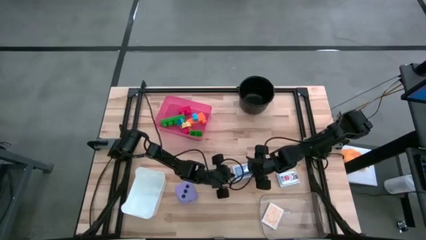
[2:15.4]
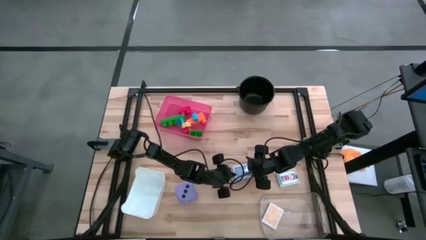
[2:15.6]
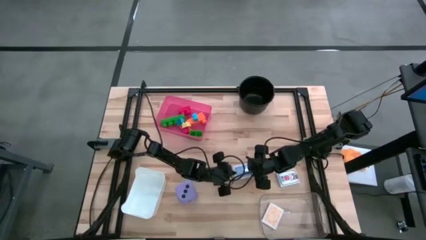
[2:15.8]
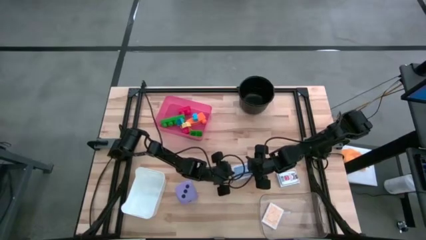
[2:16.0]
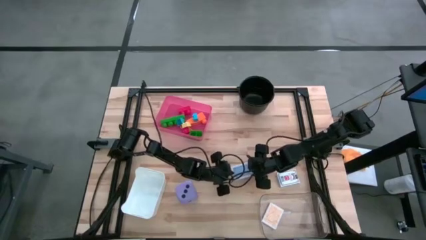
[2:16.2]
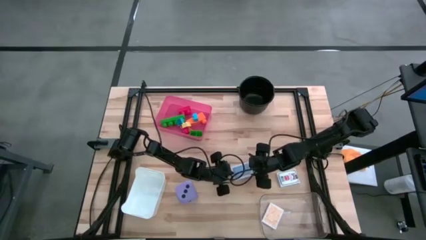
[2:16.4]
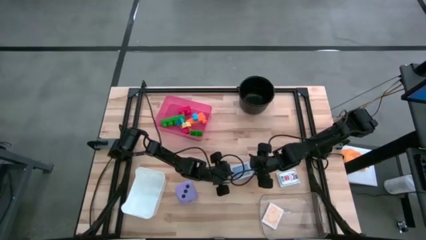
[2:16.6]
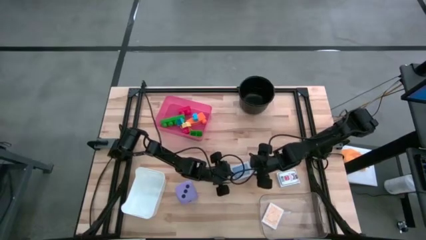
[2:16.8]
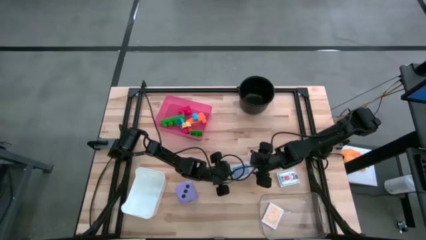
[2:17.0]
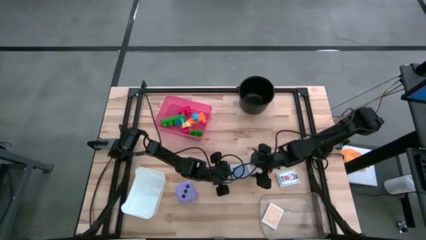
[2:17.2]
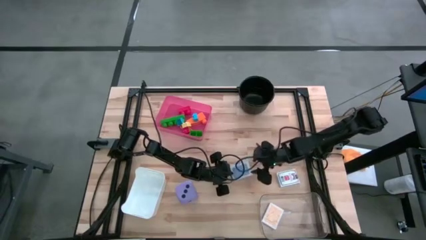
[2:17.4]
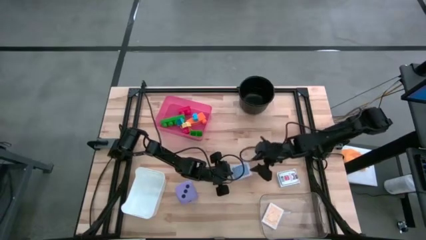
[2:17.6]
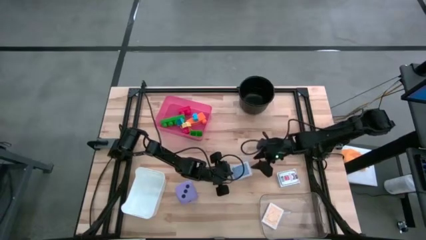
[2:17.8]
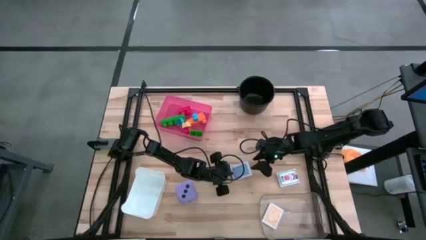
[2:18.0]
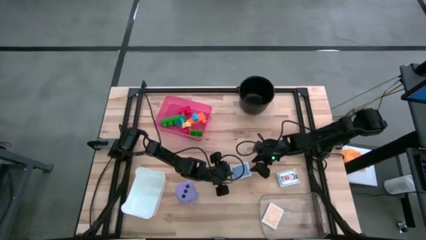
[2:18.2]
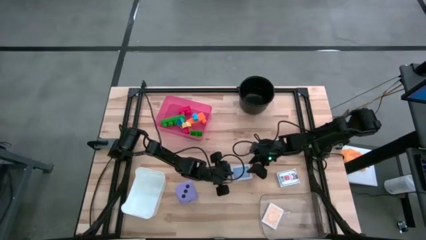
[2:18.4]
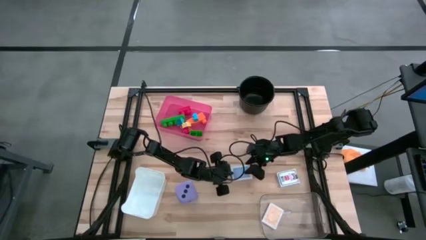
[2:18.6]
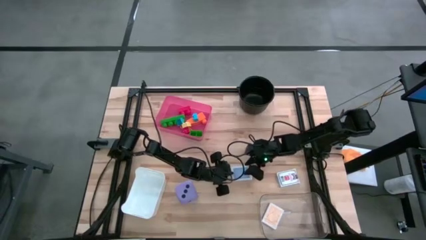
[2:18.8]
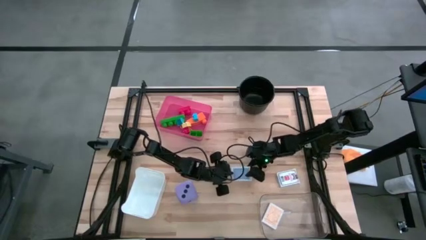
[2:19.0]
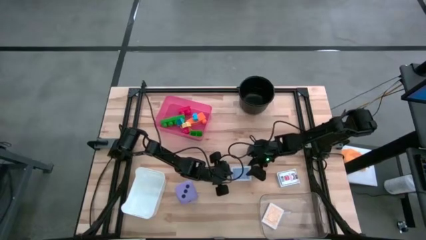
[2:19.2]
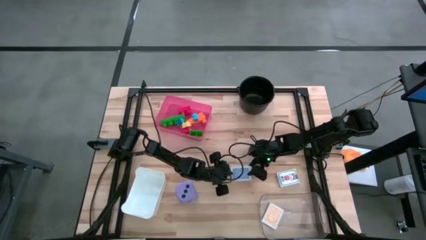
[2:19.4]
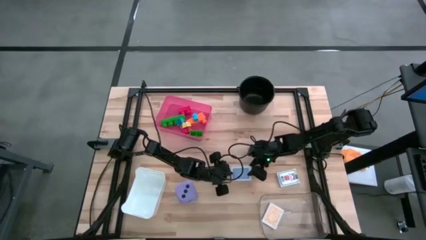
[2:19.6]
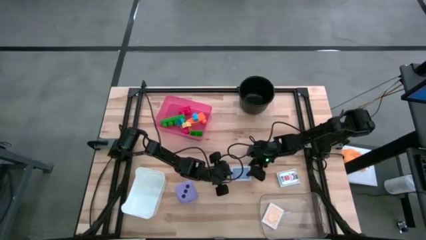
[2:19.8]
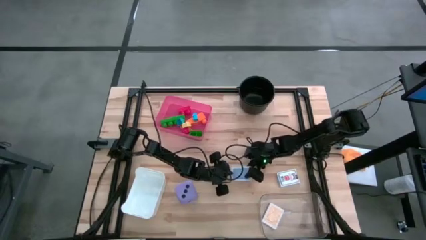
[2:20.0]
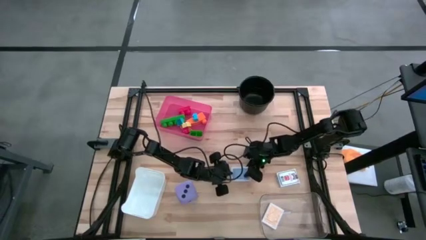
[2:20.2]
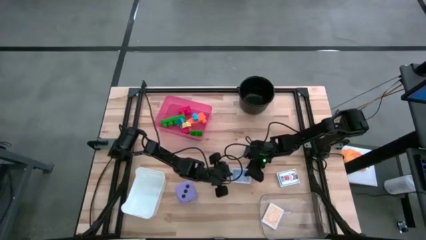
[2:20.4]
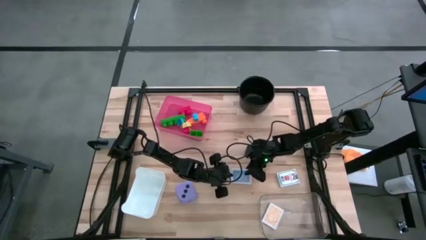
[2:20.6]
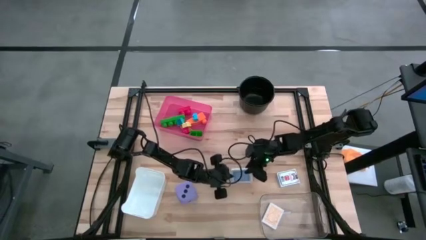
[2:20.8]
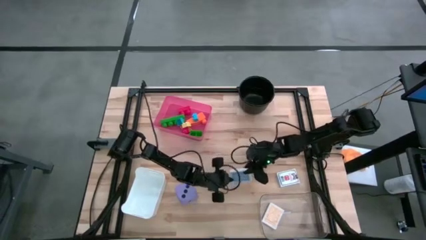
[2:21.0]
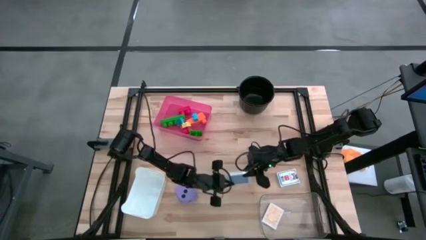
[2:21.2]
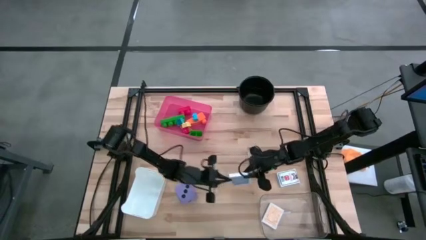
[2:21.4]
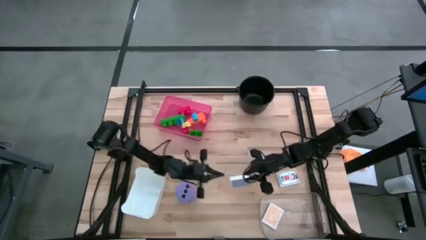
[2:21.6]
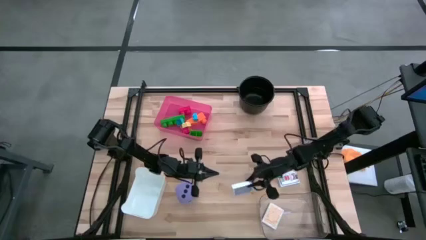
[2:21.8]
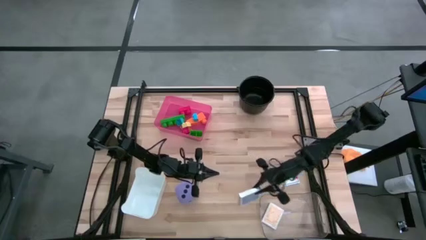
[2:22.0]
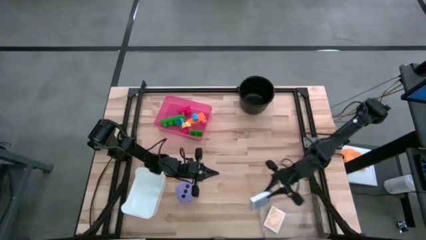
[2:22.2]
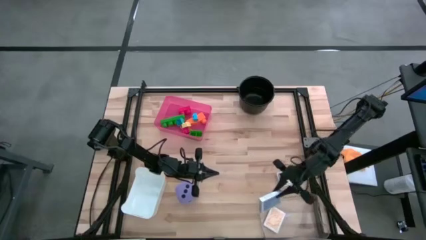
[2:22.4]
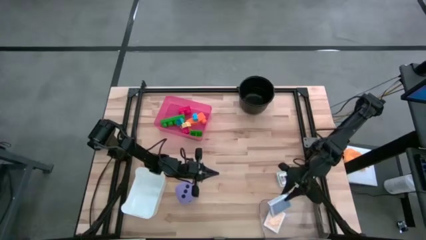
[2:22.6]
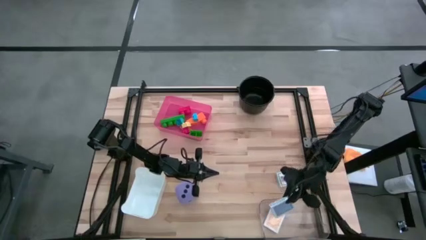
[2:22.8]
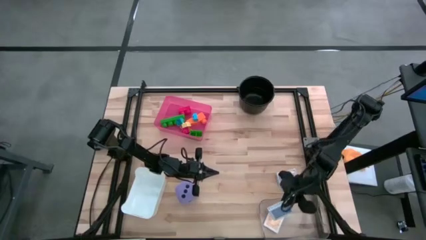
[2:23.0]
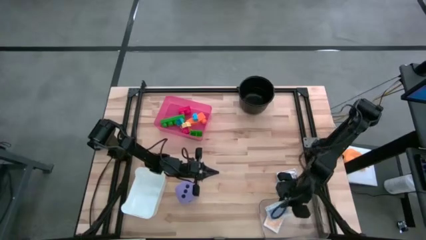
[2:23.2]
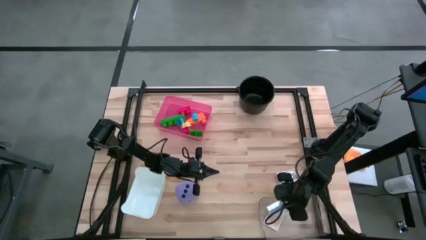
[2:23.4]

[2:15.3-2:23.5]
Task: Pick & Place Toys
Put the blue deck of cards into the transparent bin

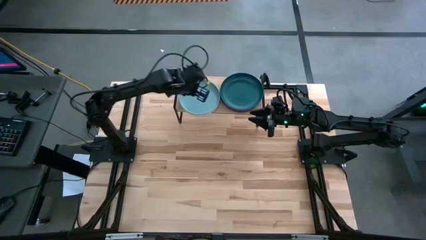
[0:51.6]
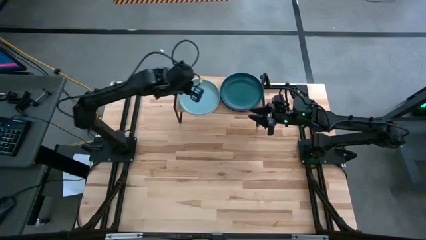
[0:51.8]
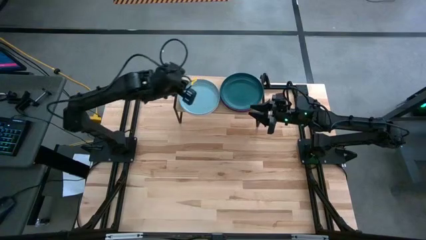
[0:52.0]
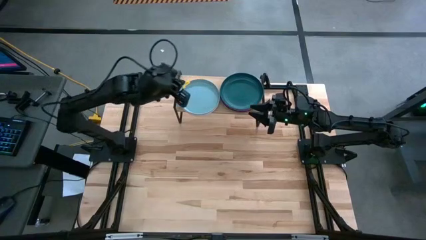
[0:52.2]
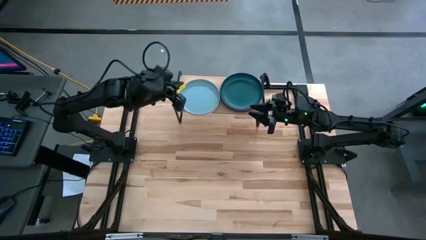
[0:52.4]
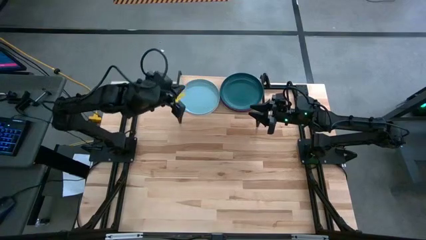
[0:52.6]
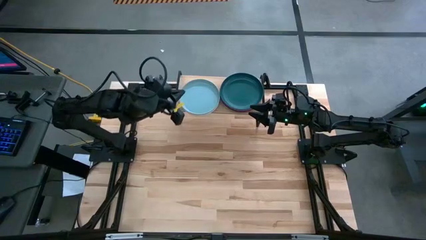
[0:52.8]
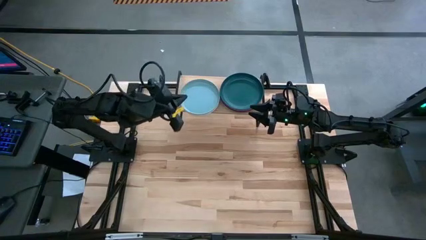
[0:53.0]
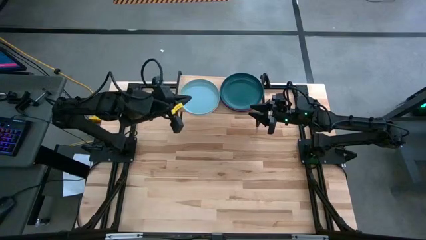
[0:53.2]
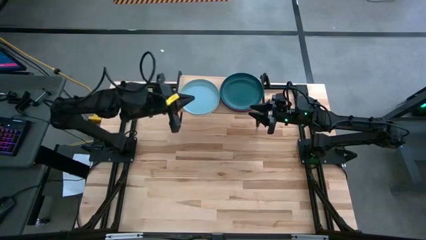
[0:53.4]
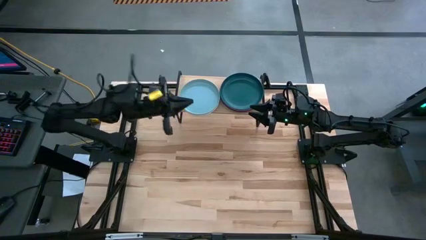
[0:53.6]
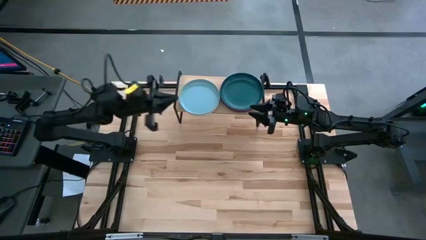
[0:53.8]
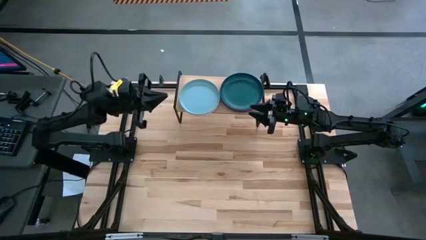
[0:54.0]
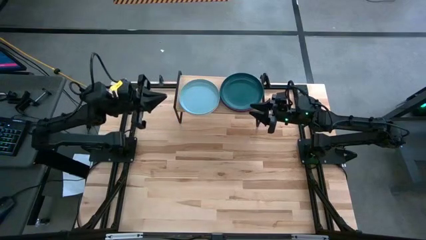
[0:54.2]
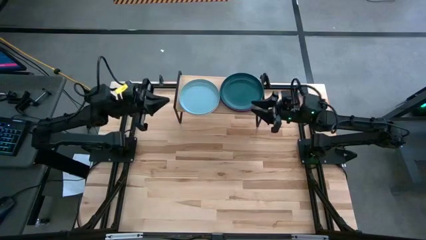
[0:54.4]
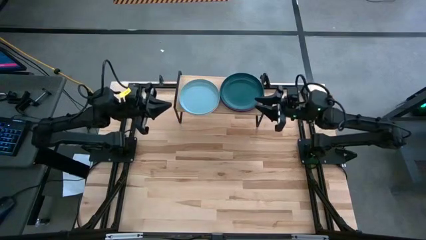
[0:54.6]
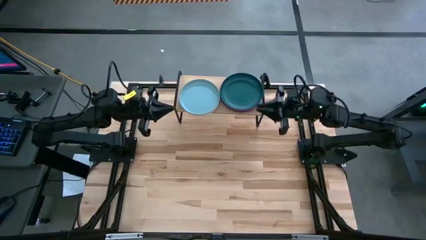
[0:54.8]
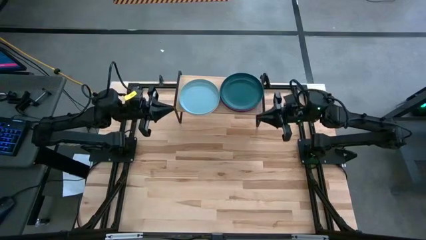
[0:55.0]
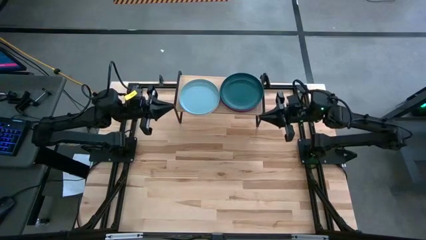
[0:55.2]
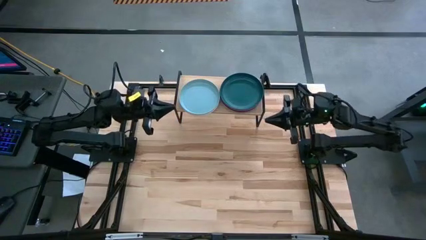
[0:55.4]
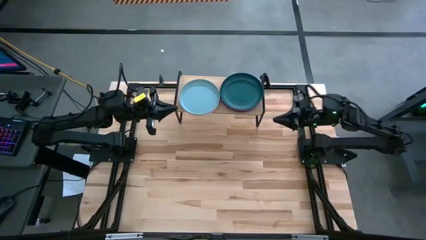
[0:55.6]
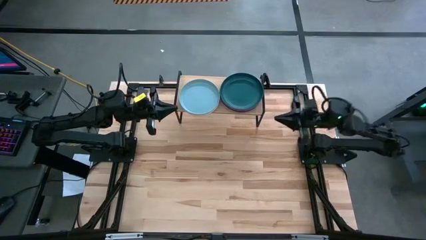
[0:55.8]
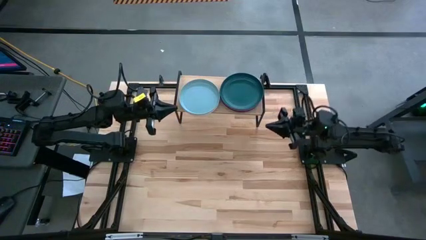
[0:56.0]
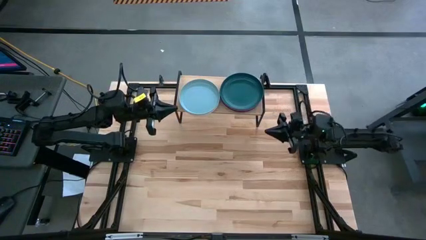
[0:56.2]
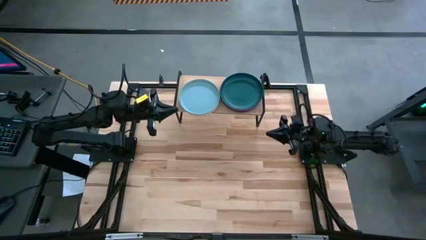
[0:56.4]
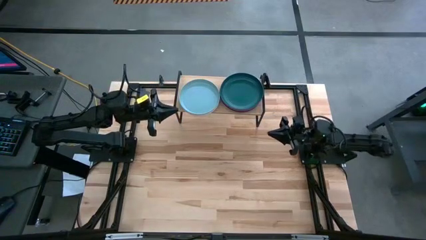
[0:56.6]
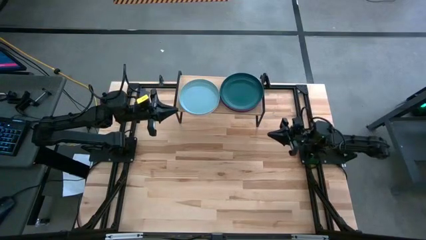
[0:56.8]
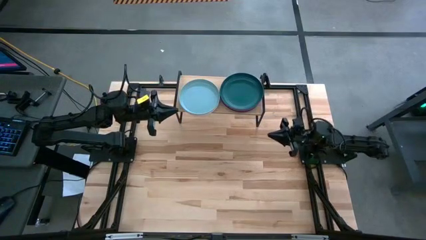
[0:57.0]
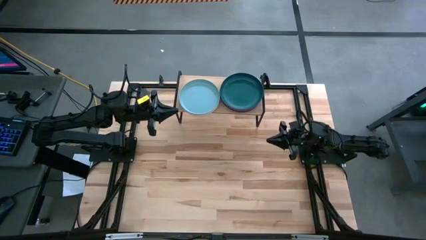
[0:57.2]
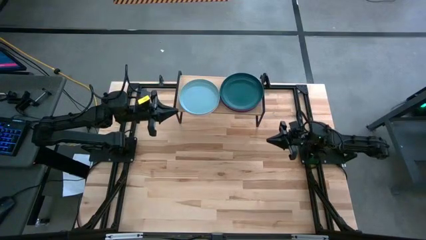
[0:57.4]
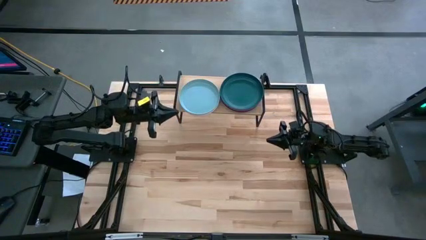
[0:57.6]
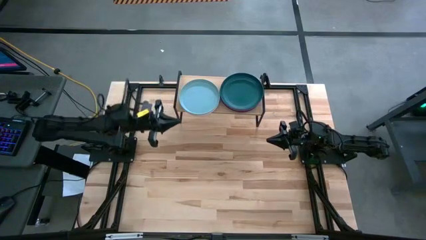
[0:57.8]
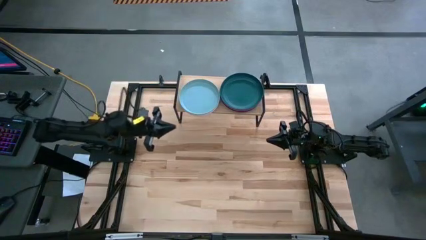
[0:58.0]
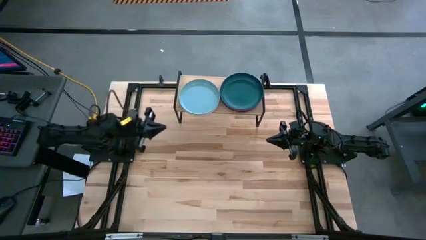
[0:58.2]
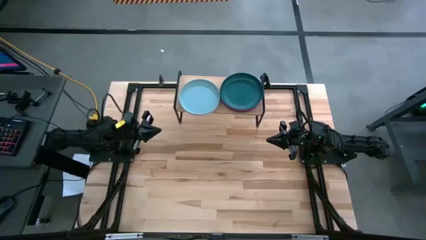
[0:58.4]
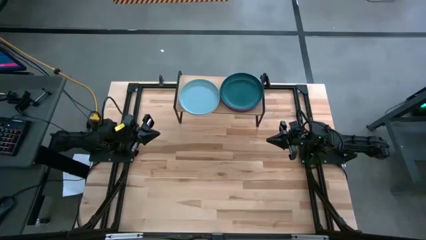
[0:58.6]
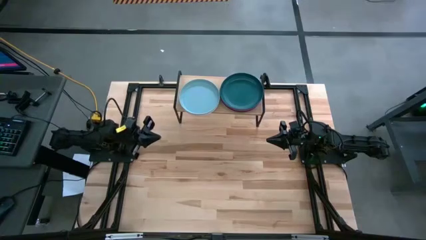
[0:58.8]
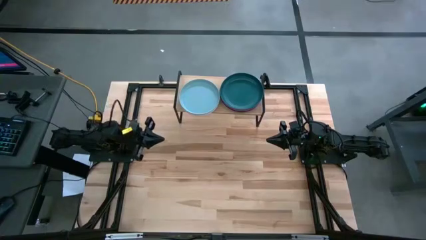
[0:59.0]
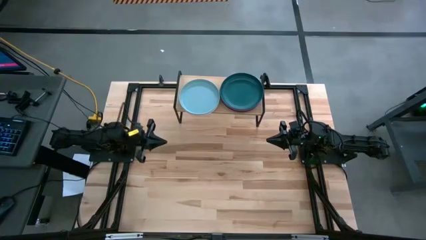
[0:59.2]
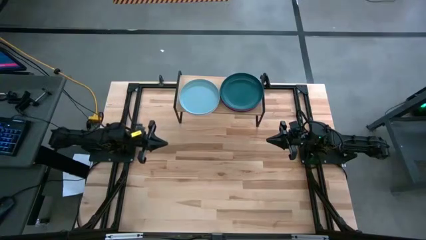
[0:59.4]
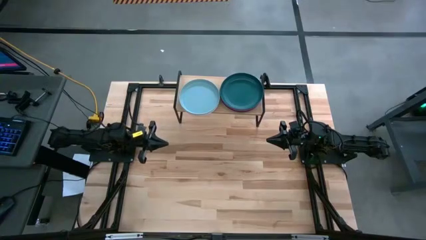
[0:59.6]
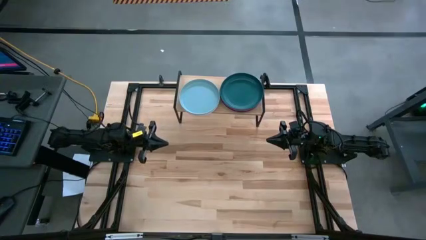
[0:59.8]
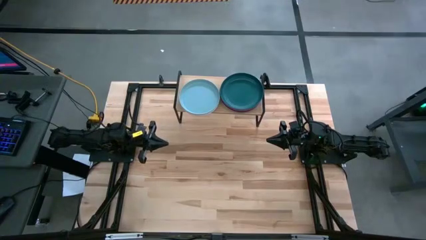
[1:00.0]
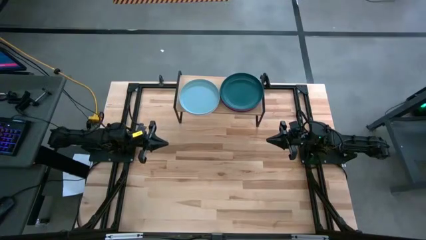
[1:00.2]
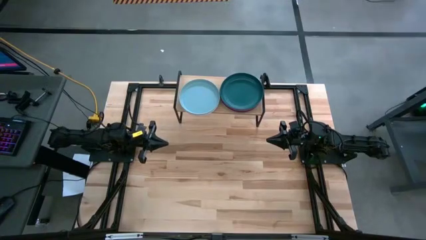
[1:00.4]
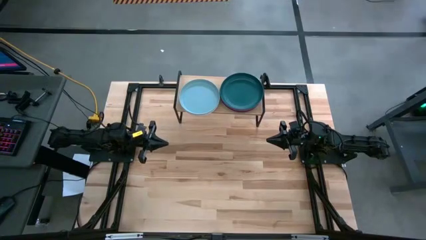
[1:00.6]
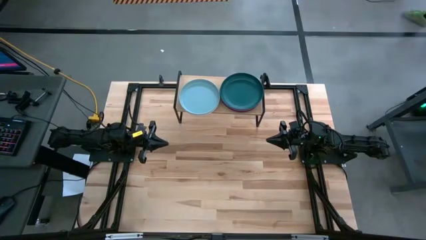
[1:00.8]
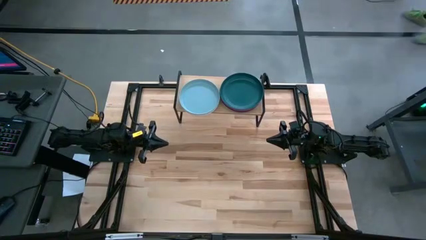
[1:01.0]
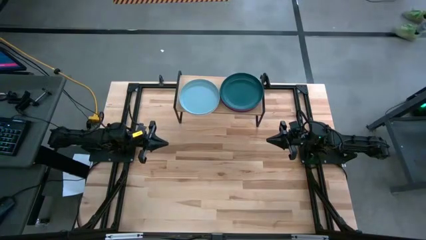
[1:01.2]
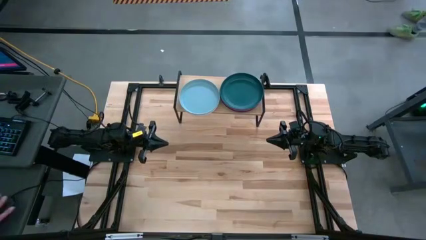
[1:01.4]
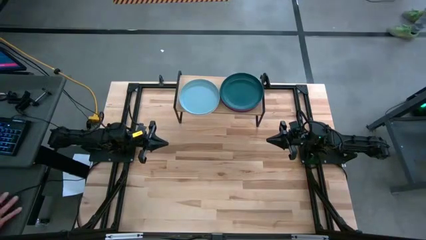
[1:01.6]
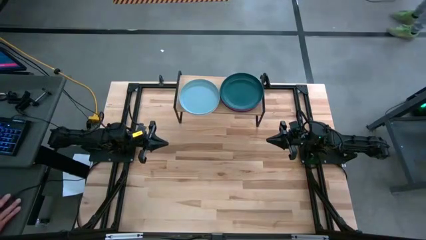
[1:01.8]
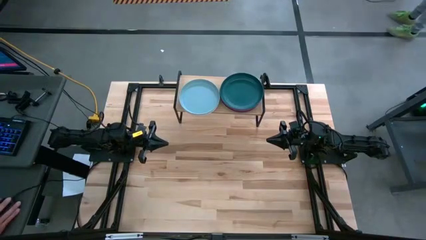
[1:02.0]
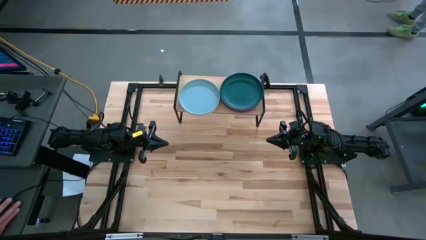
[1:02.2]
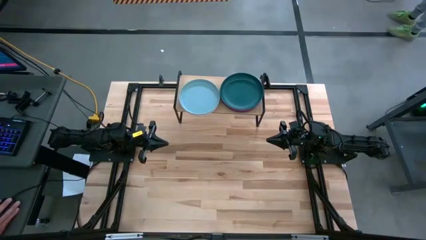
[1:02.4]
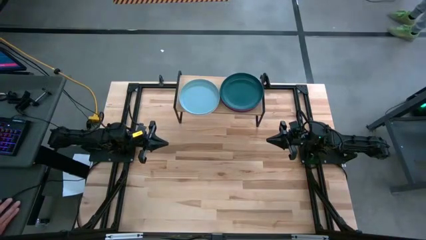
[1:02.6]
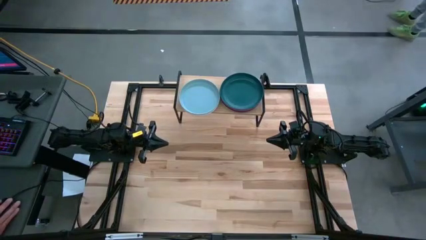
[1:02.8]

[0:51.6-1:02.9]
Task: Place and stack plates onto a shelf
Return to Home Position
